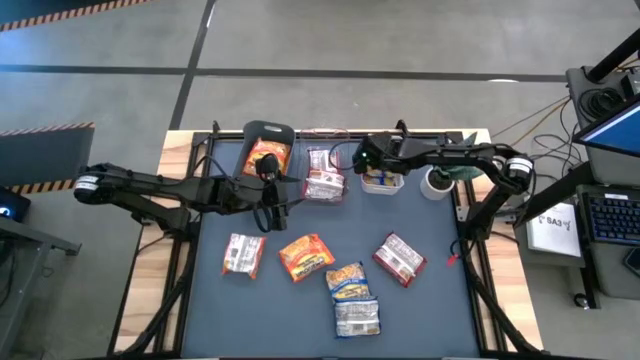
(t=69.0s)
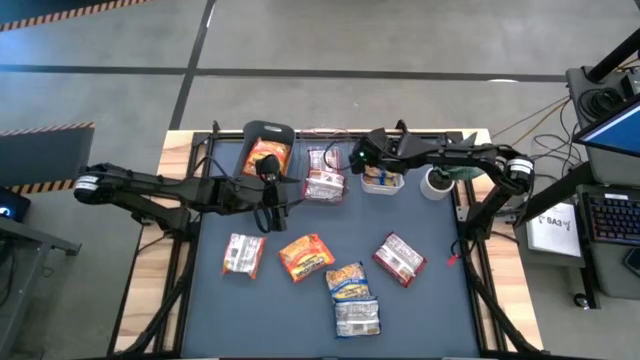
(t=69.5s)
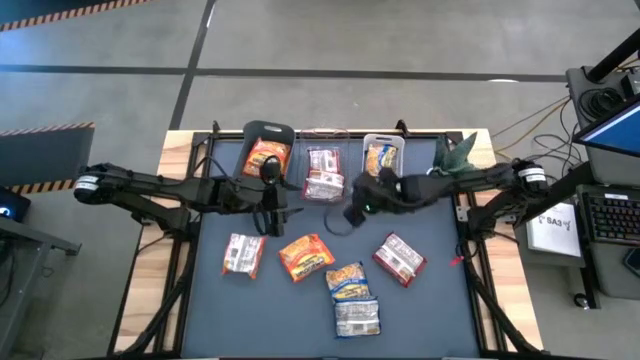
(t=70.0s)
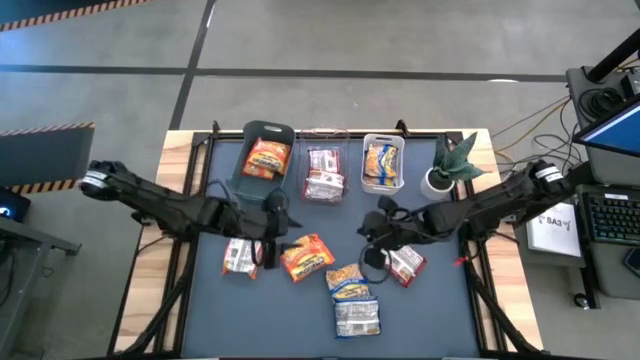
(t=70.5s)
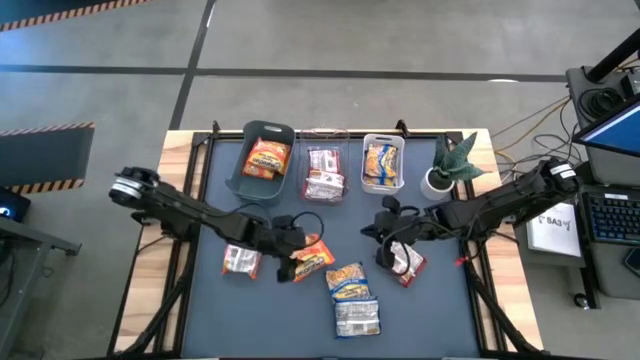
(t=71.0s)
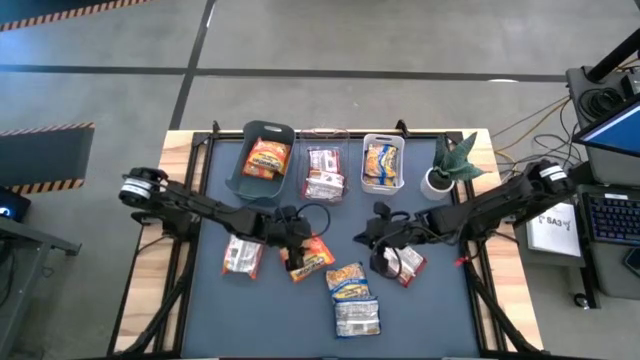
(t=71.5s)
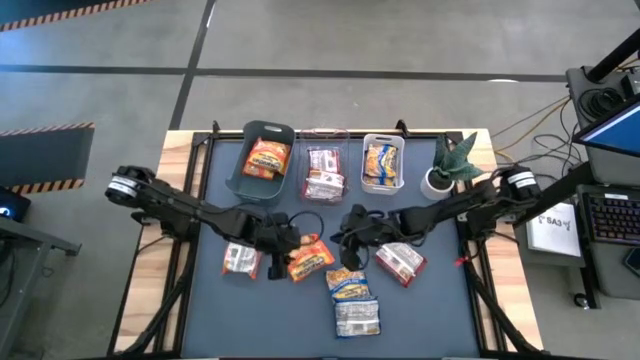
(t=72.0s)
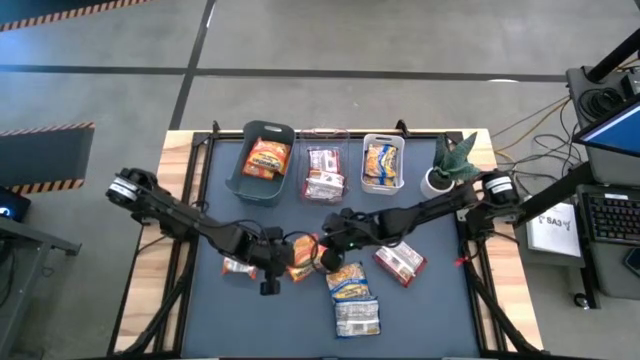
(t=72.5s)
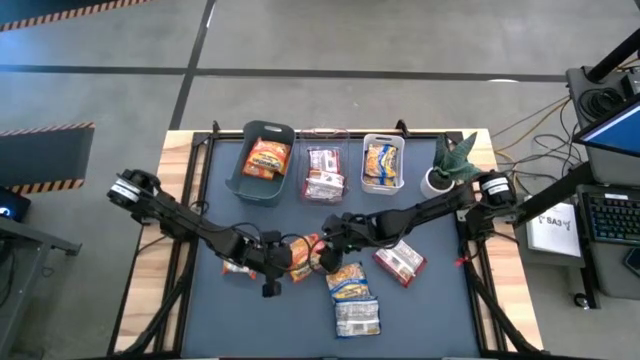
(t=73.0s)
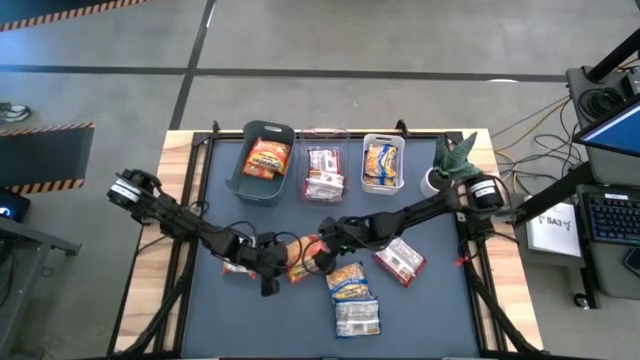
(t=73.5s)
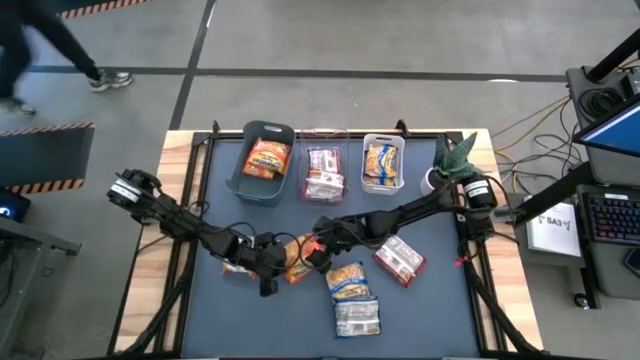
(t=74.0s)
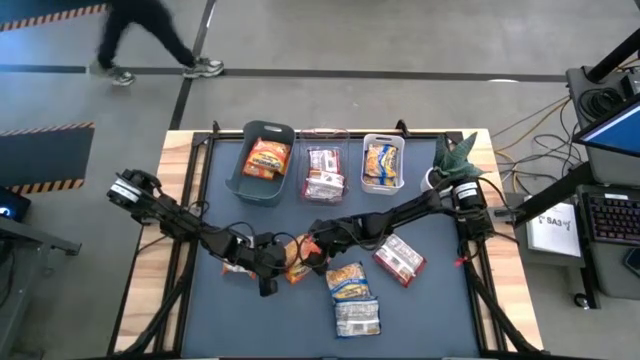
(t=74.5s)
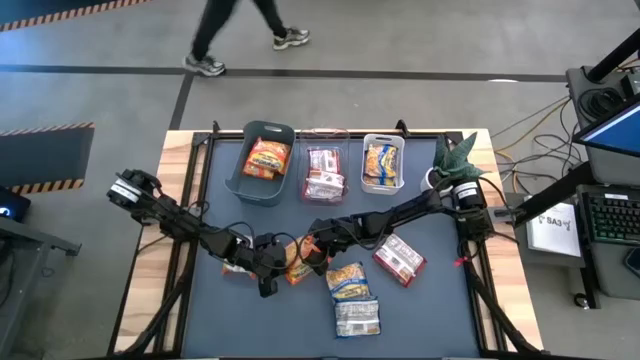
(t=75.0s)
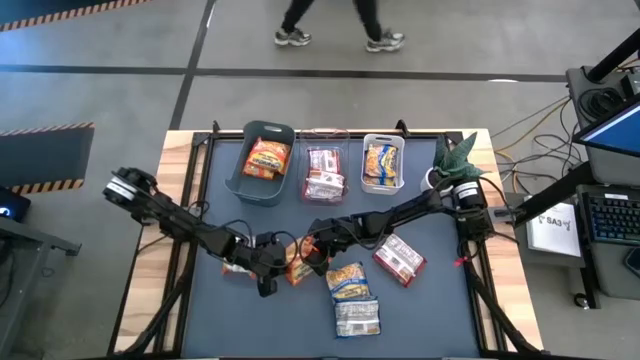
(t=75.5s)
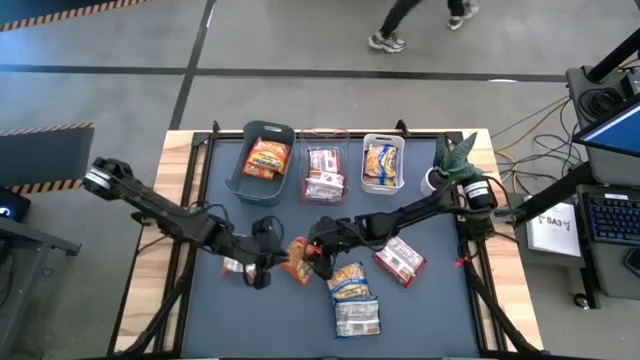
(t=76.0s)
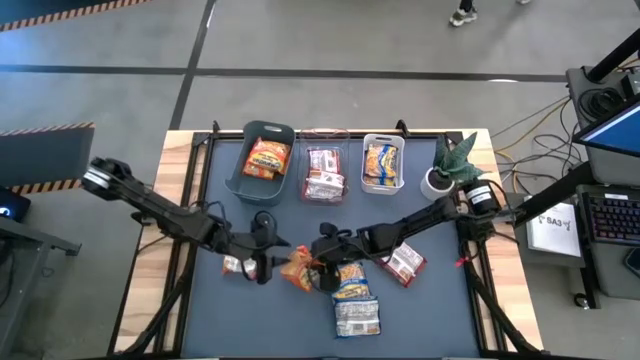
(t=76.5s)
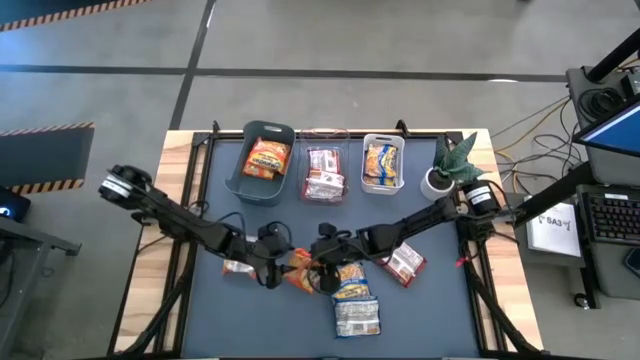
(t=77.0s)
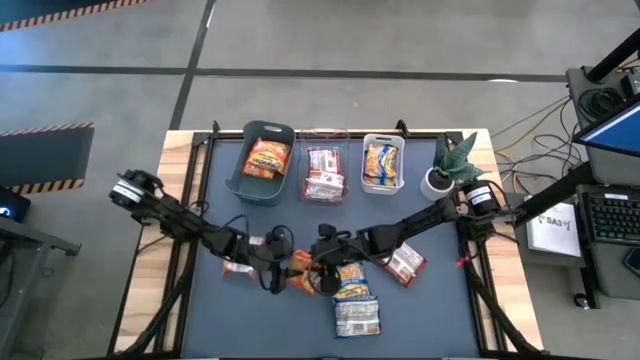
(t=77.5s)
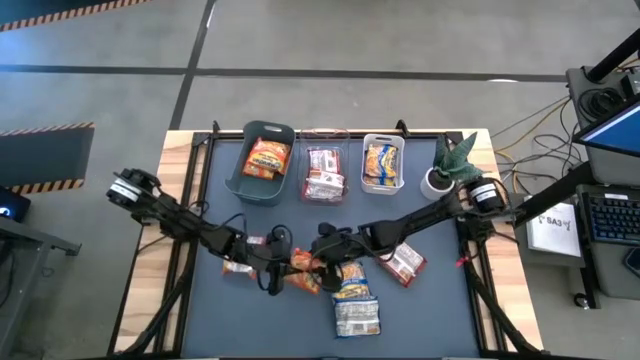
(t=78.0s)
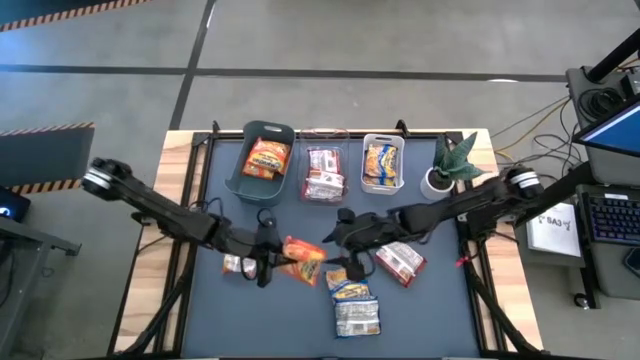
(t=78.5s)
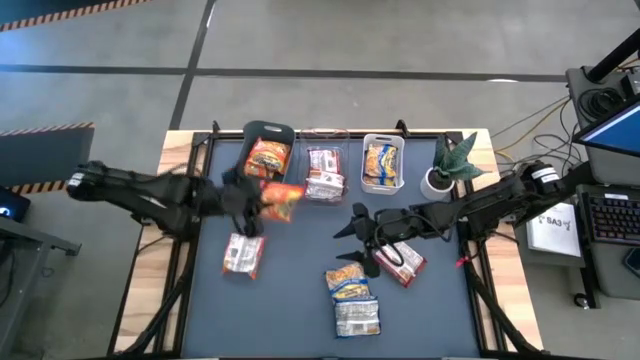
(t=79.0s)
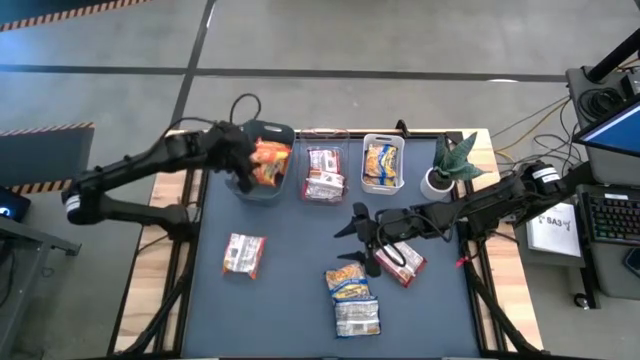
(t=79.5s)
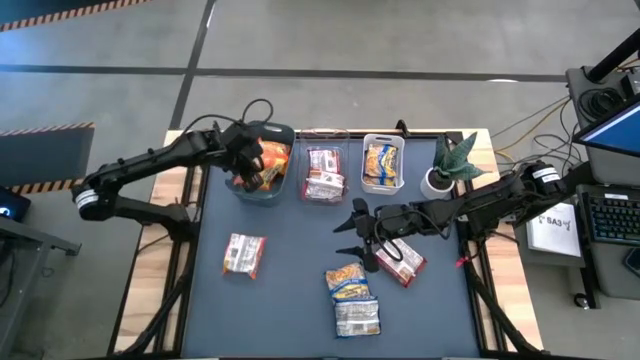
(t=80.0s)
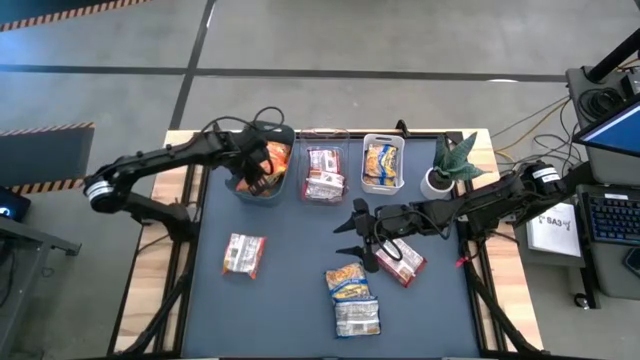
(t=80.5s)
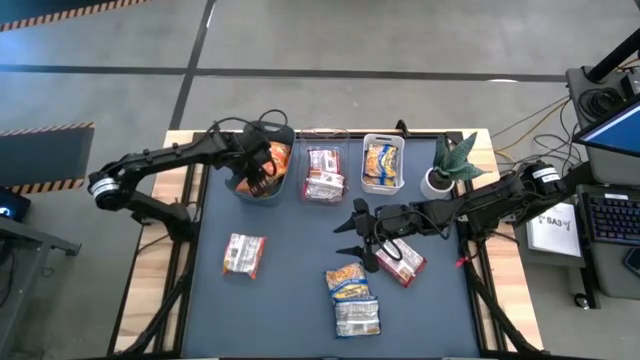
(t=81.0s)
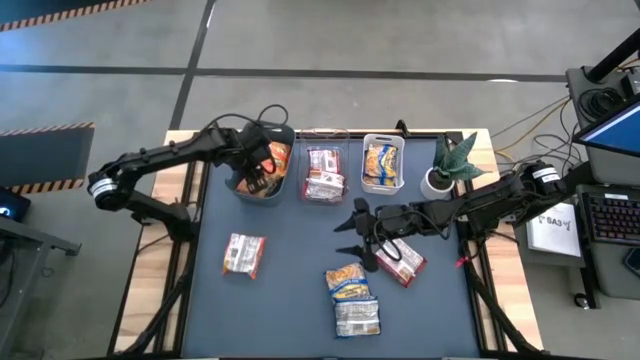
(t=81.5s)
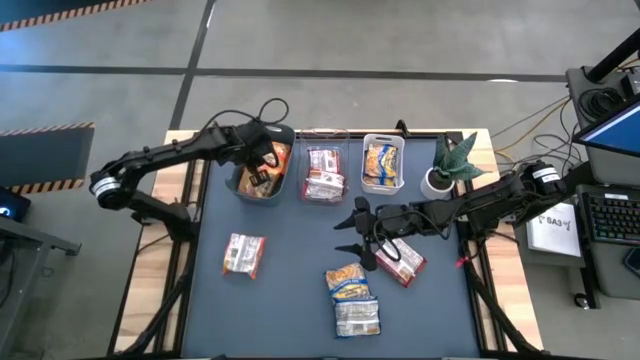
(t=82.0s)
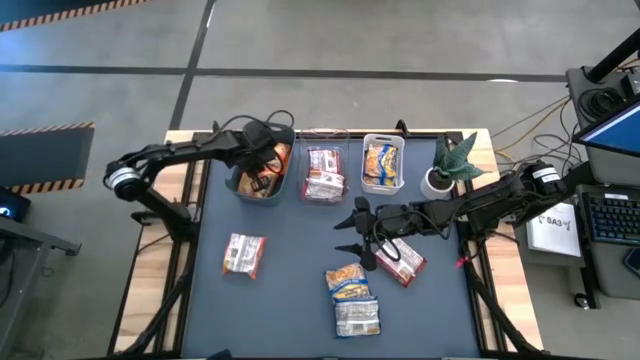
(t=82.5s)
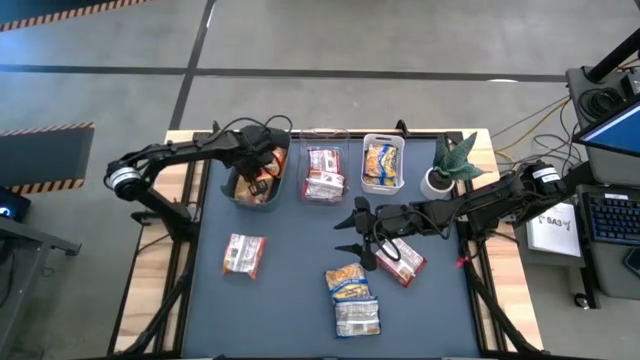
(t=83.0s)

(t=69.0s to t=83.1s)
Task: Sort Maruchan noodles
Put the orange noodle pack into the dark green bin
